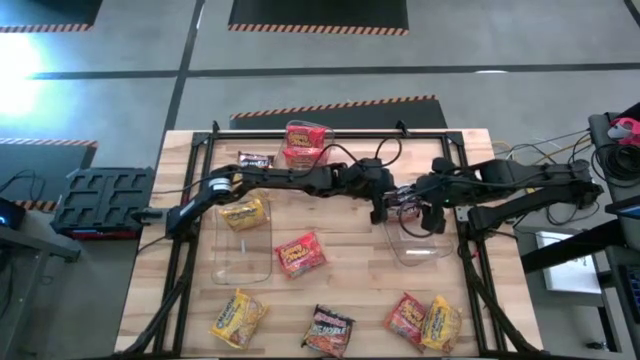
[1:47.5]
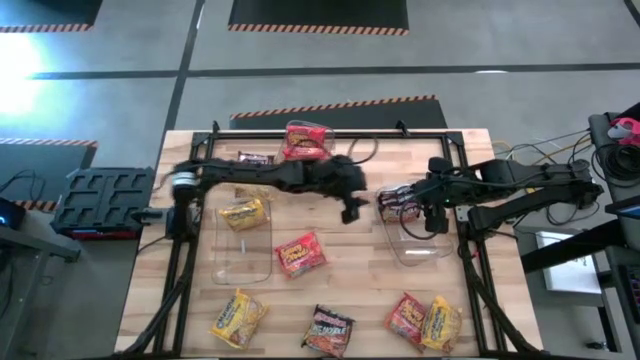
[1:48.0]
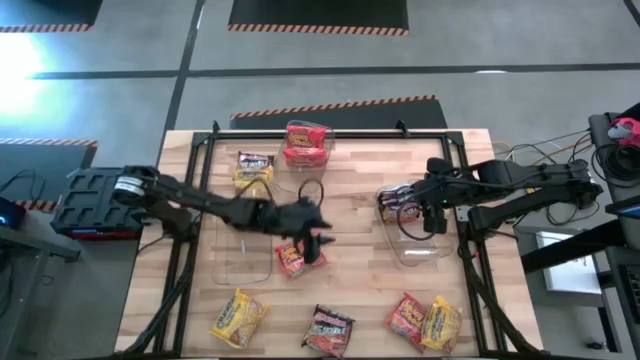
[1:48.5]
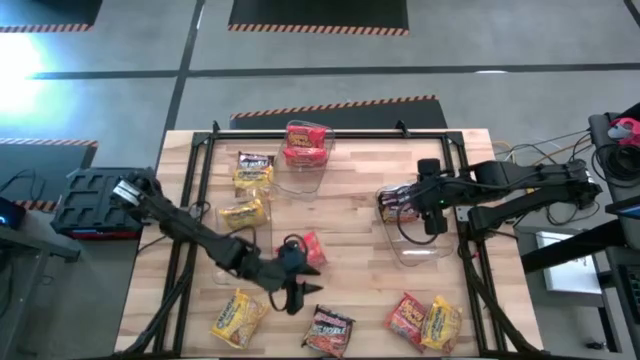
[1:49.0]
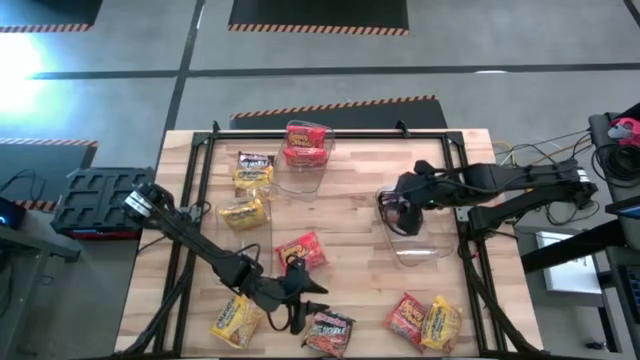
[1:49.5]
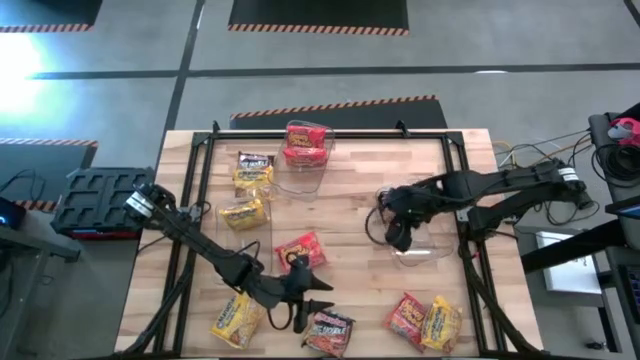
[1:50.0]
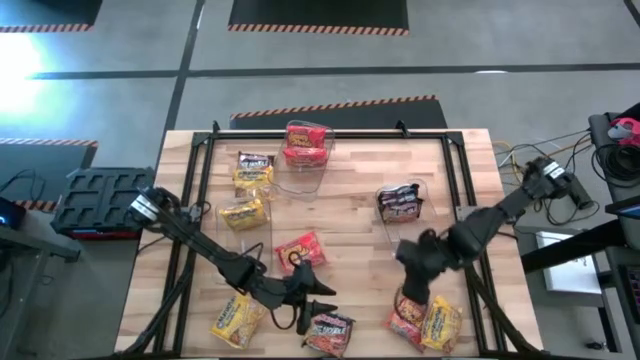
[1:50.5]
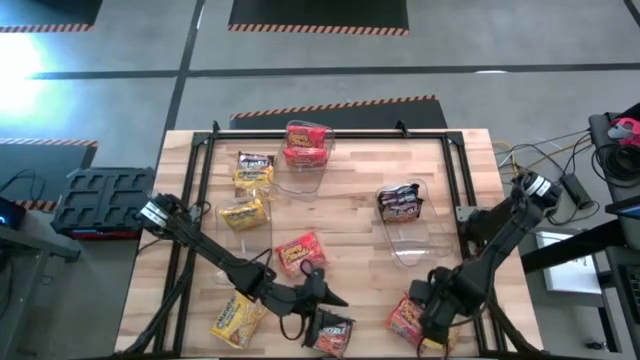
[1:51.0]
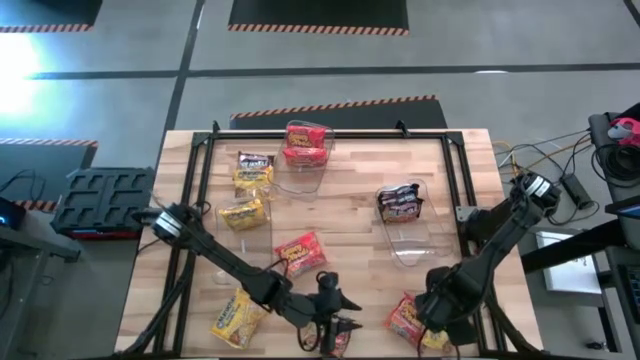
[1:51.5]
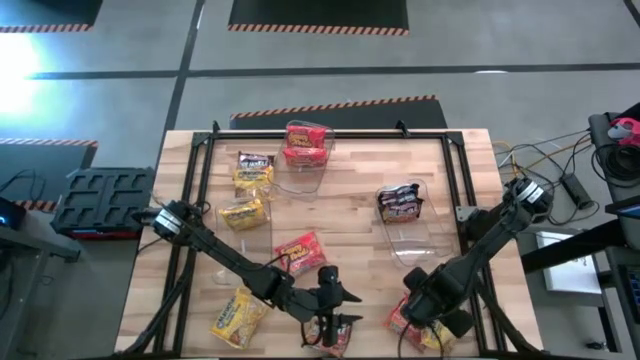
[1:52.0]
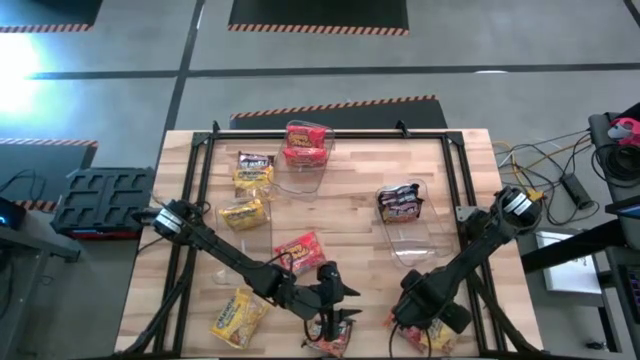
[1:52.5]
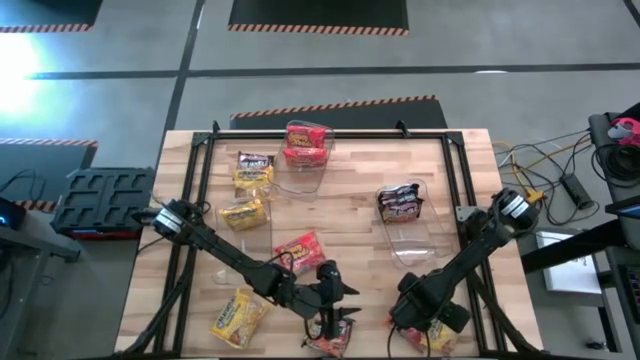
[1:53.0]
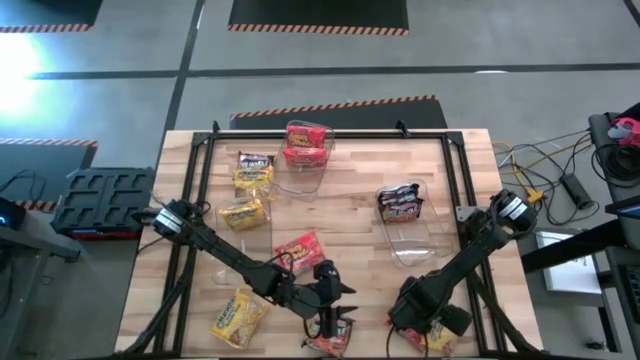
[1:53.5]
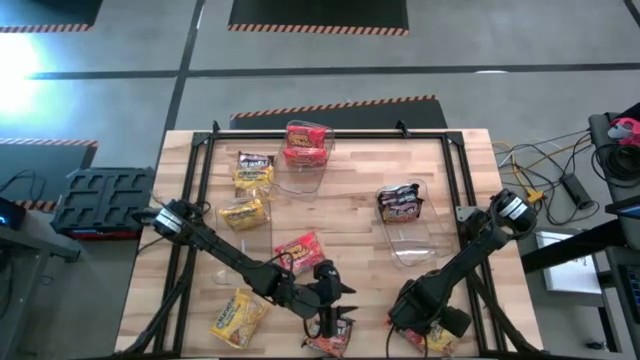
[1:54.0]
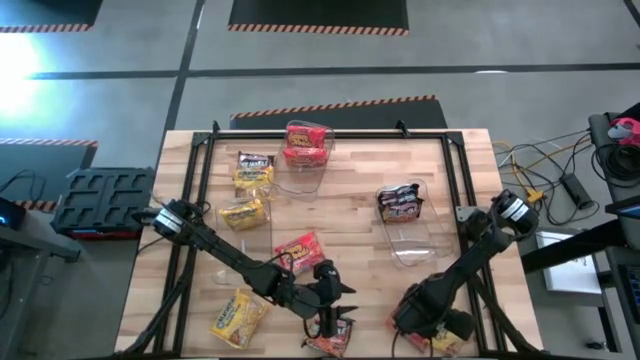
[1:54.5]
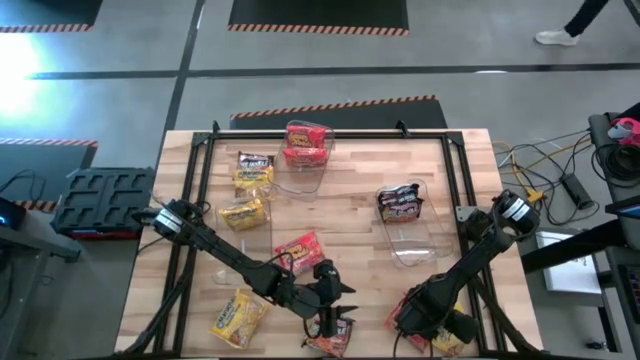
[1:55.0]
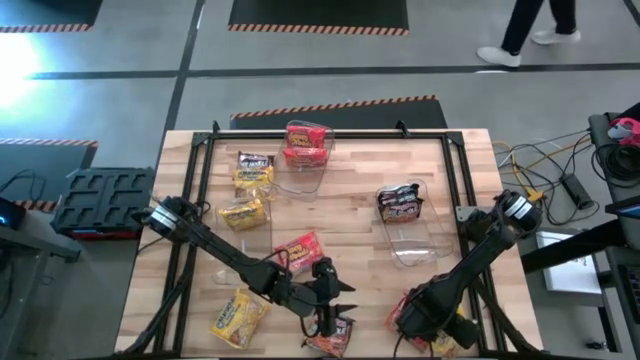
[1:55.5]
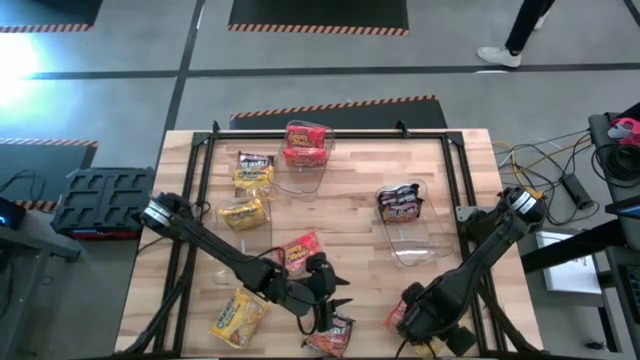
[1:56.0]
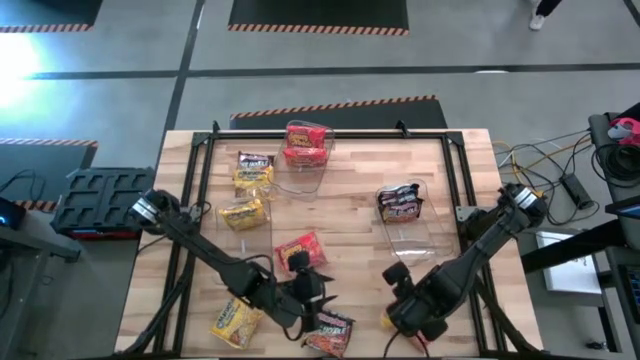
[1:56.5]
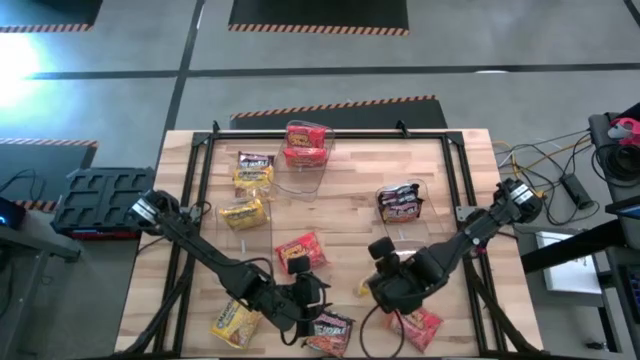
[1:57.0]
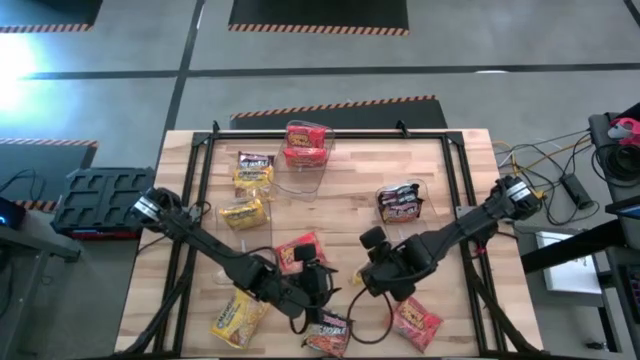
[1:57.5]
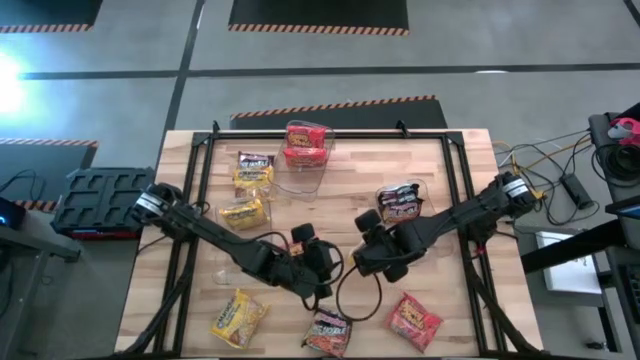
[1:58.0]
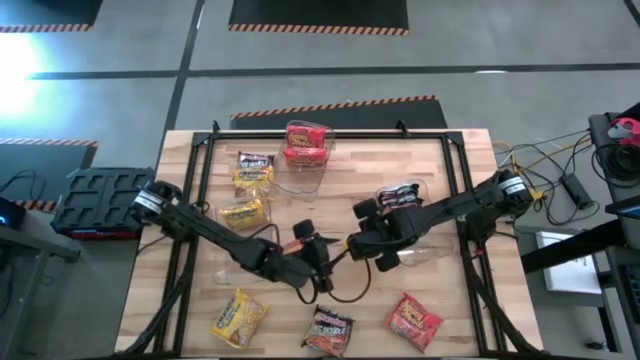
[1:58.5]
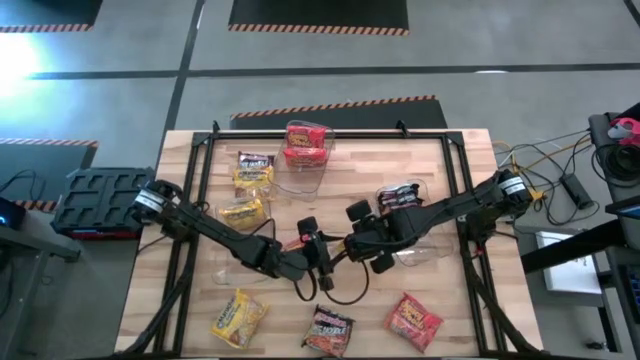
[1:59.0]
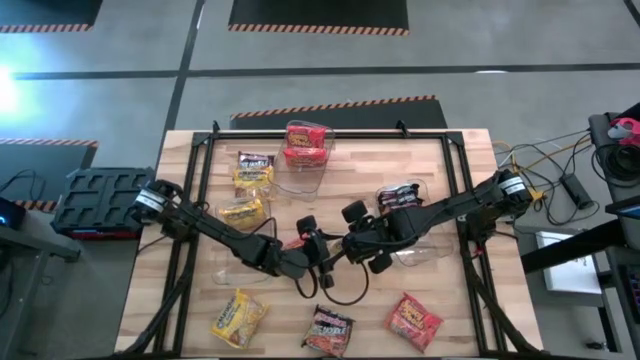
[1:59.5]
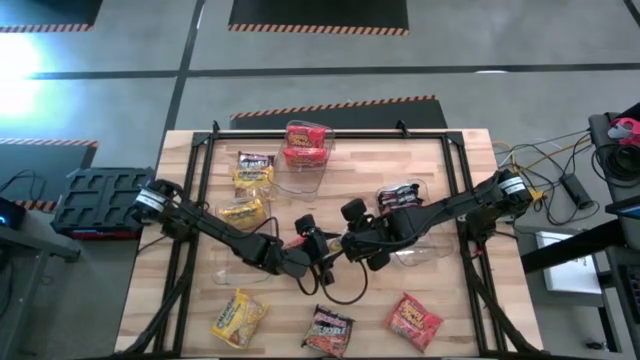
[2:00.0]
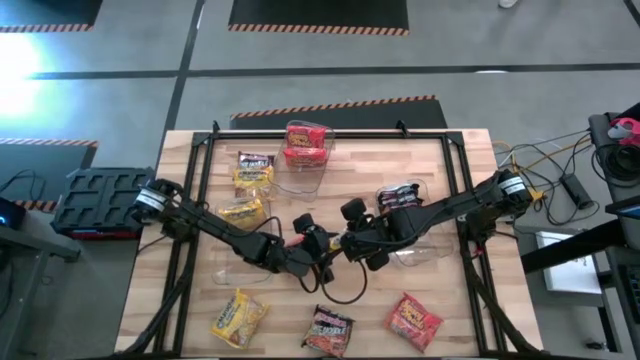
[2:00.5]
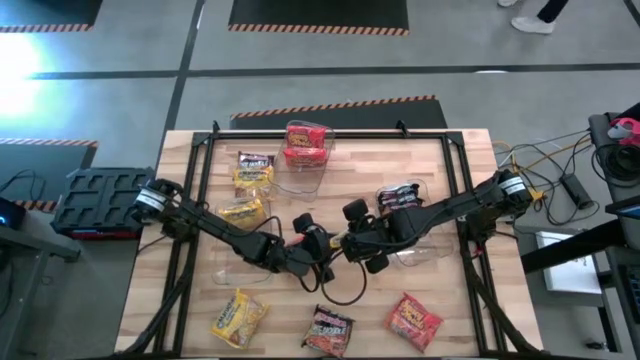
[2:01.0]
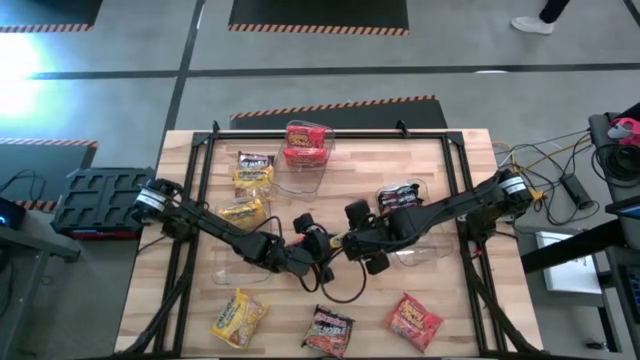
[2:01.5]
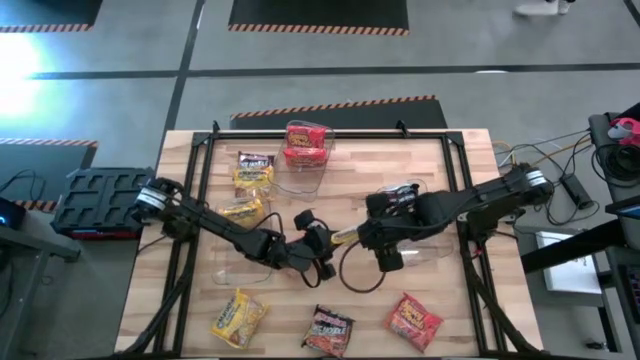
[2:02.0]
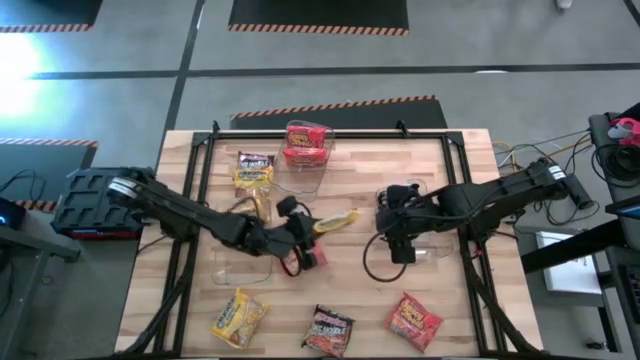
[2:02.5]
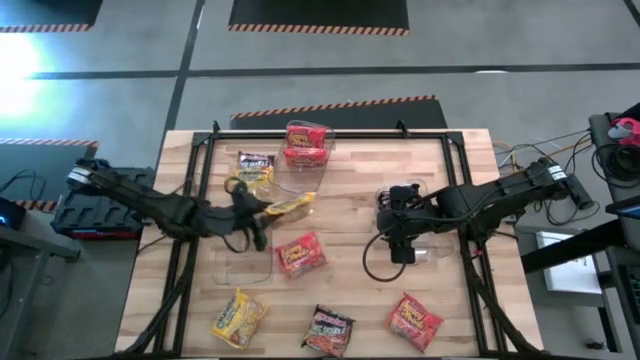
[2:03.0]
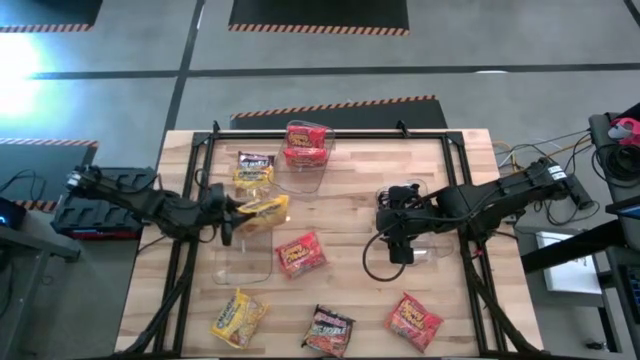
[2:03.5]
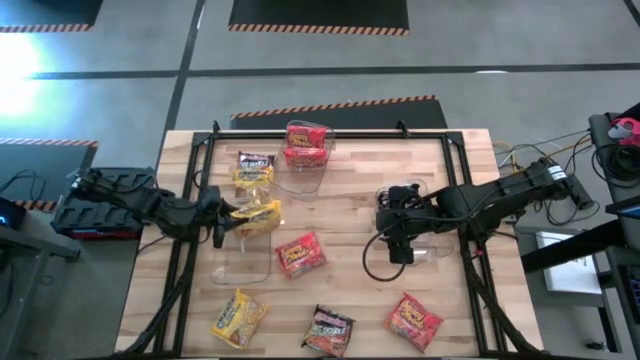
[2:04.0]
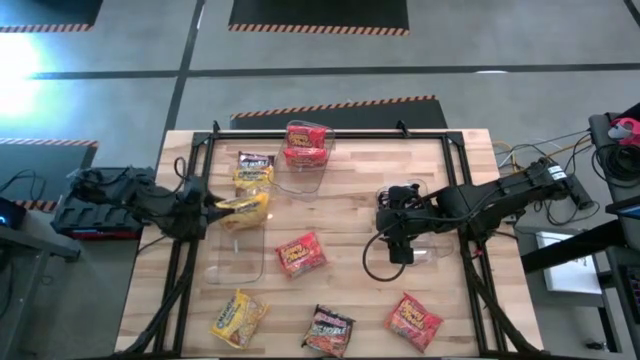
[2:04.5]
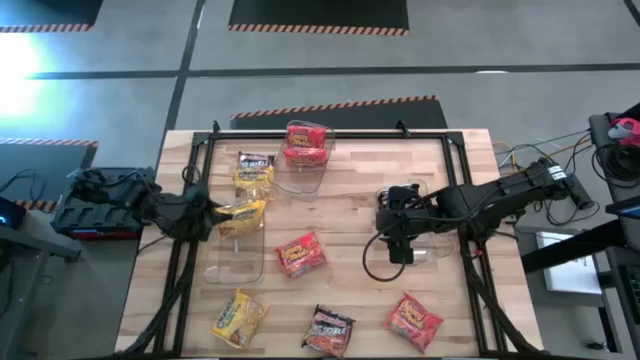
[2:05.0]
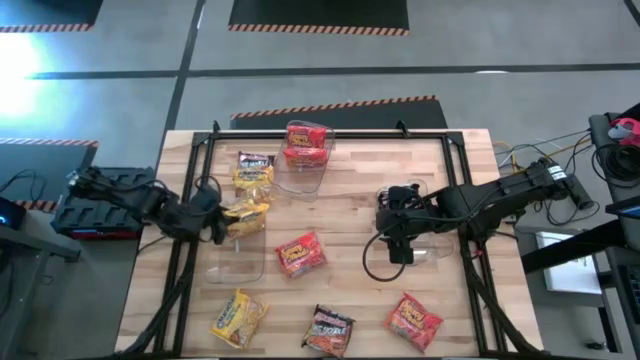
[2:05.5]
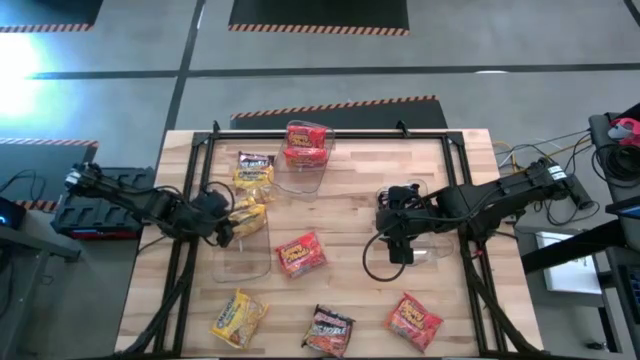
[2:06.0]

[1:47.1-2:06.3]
Task: Sort Maruchan noodles
Put the bottom right yellow pack noodle into the bottom left transparent bin

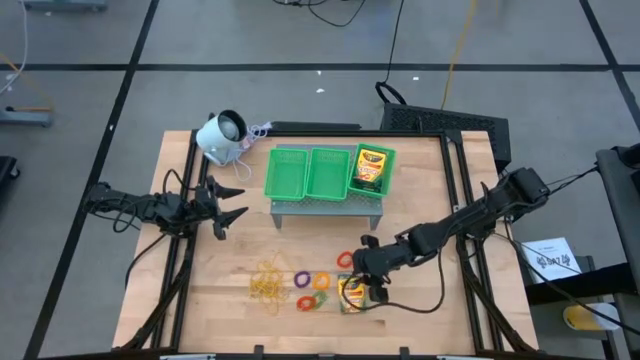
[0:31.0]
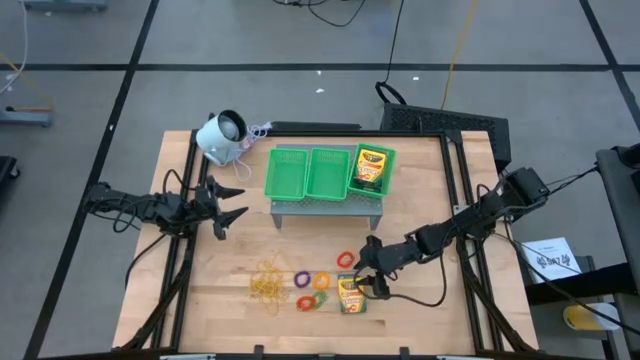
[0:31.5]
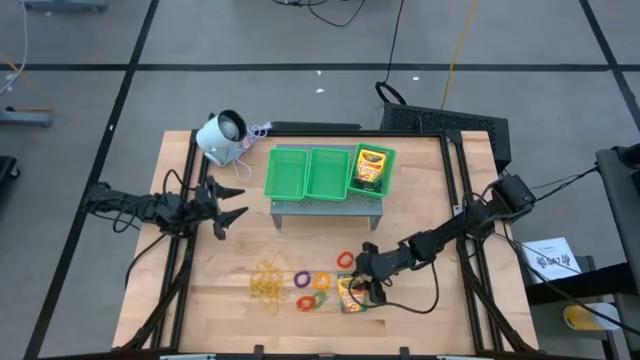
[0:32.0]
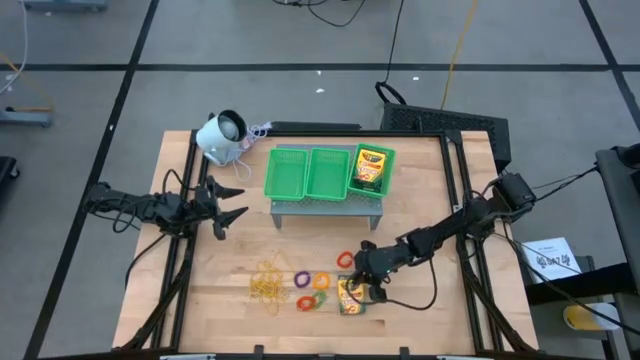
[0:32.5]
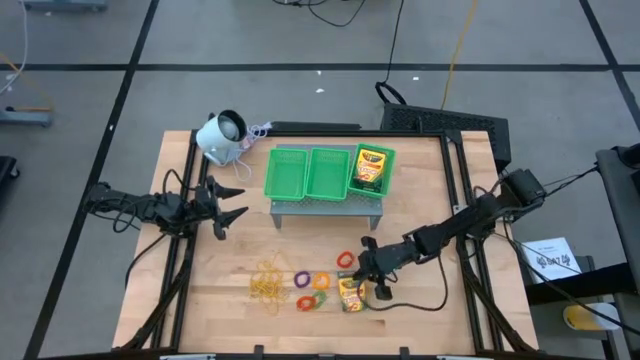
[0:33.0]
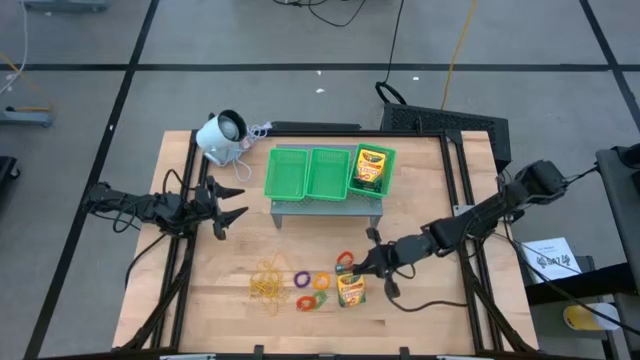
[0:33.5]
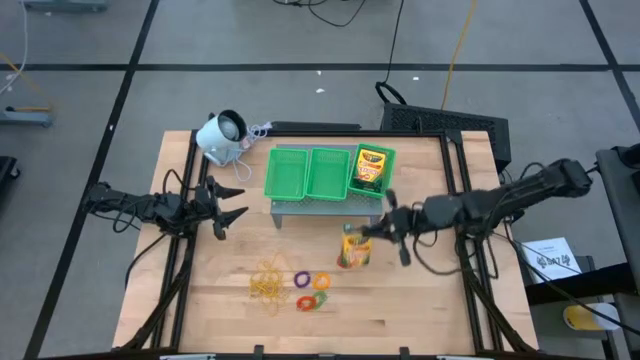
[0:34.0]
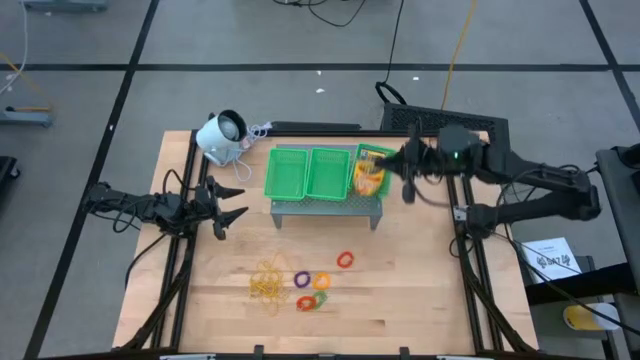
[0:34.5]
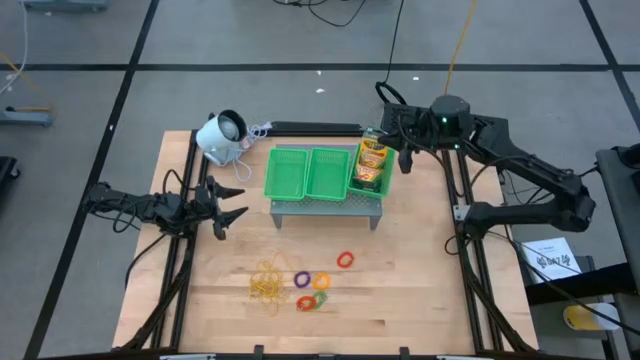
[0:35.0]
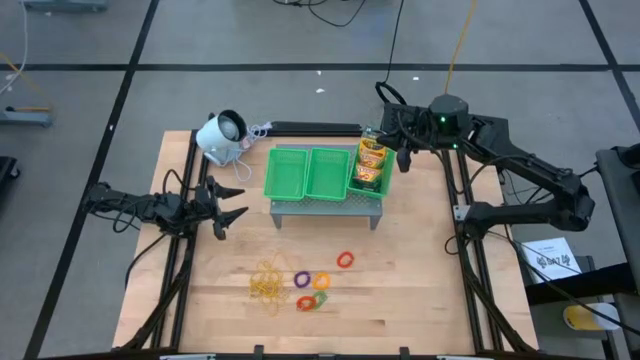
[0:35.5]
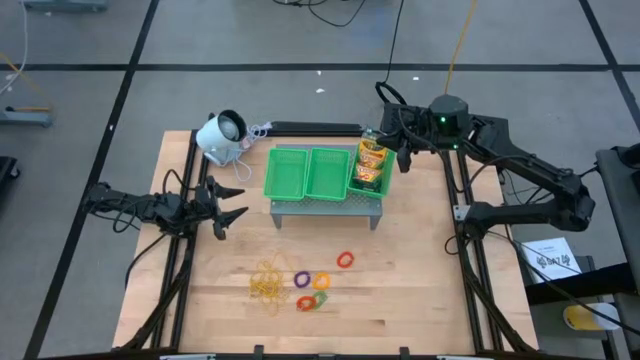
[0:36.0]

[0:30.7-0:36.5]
Task: Pick & Place Office Desk Supplies
Stack the right yellow crayon box on the yellow crayon box in the right green basket
